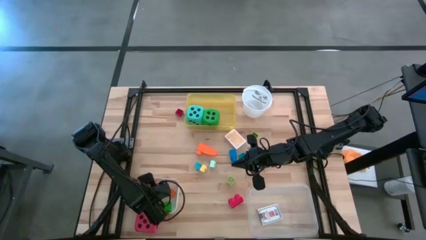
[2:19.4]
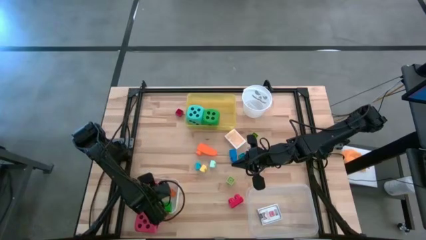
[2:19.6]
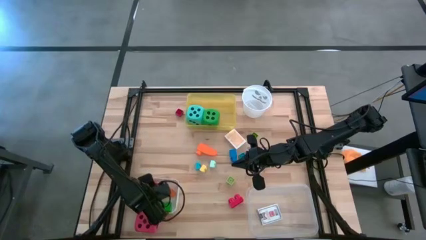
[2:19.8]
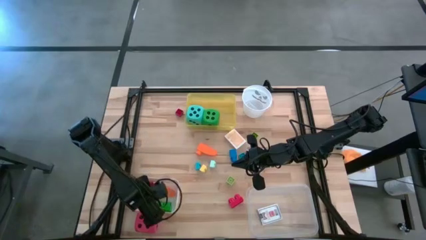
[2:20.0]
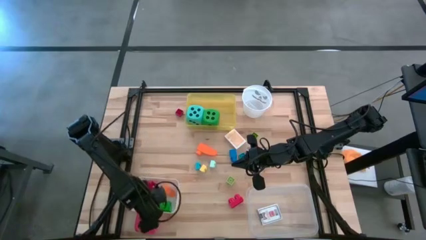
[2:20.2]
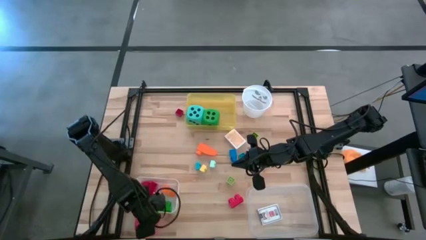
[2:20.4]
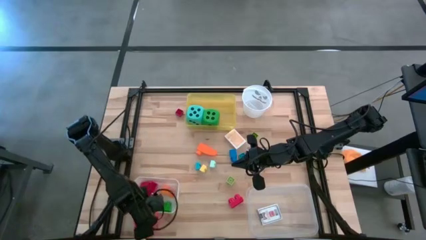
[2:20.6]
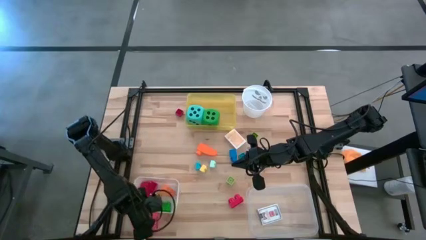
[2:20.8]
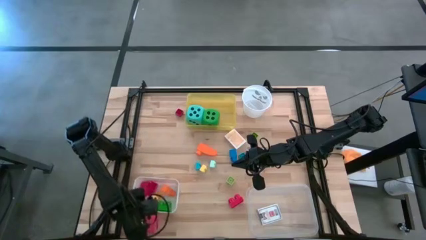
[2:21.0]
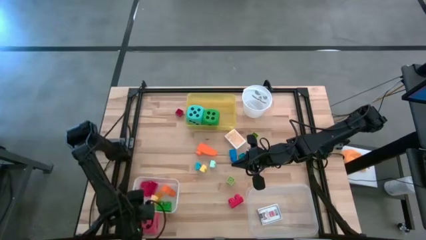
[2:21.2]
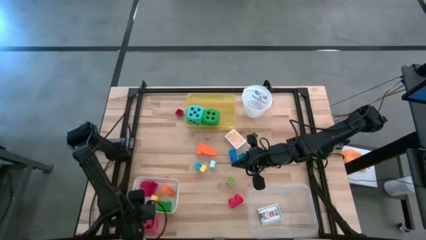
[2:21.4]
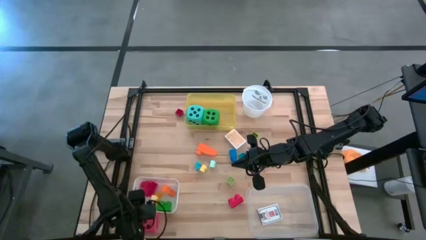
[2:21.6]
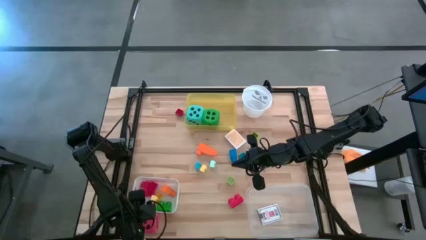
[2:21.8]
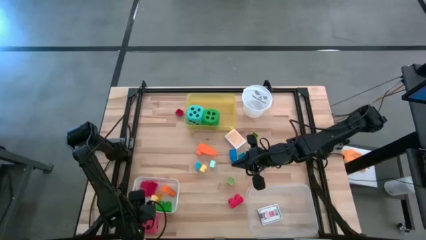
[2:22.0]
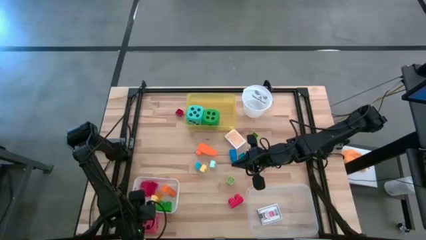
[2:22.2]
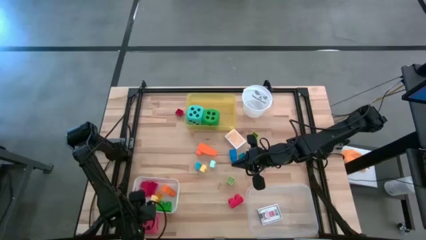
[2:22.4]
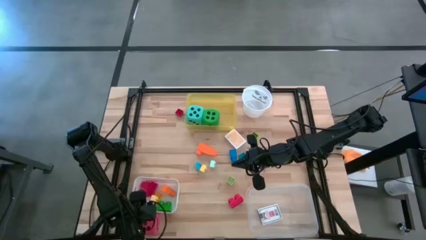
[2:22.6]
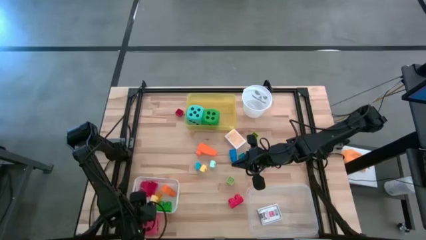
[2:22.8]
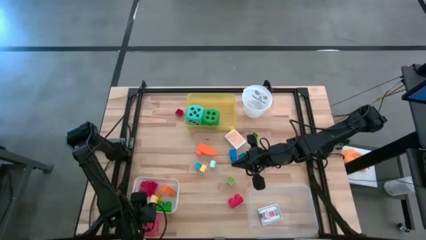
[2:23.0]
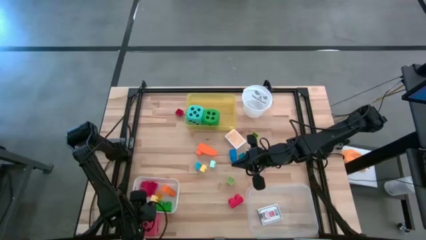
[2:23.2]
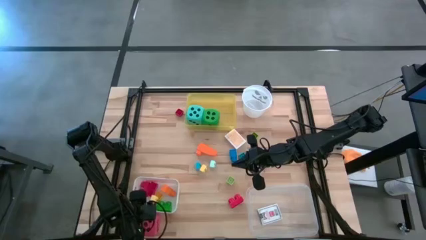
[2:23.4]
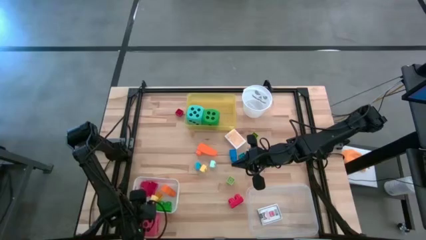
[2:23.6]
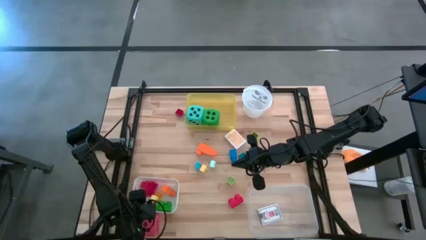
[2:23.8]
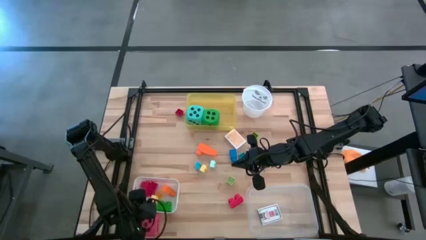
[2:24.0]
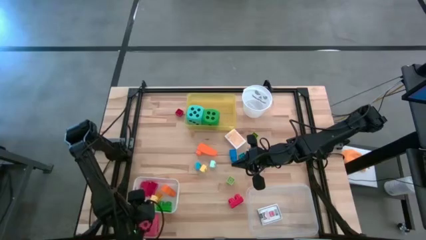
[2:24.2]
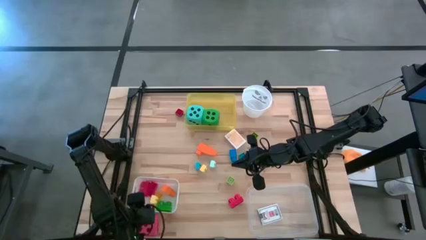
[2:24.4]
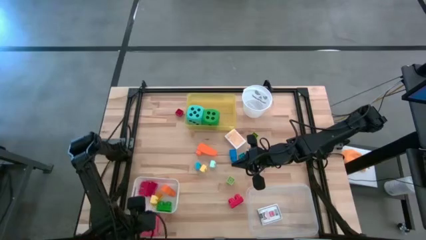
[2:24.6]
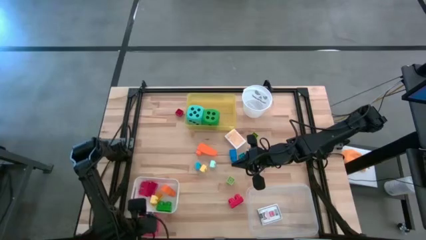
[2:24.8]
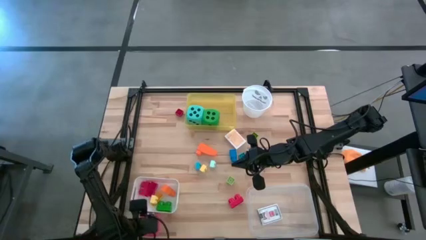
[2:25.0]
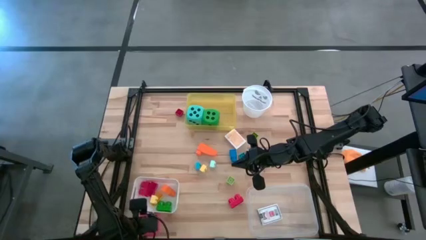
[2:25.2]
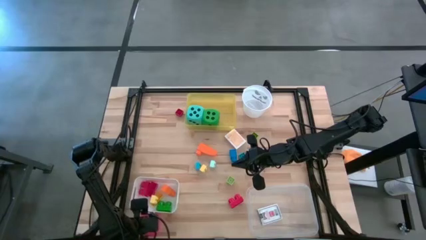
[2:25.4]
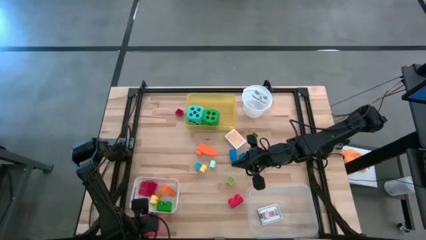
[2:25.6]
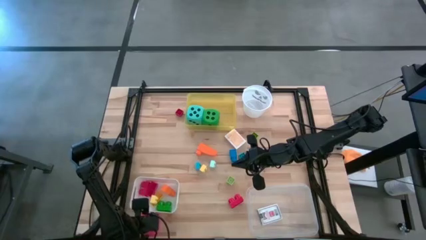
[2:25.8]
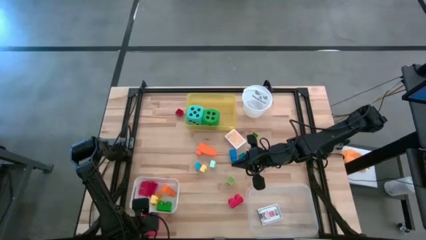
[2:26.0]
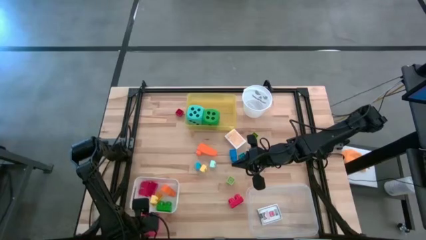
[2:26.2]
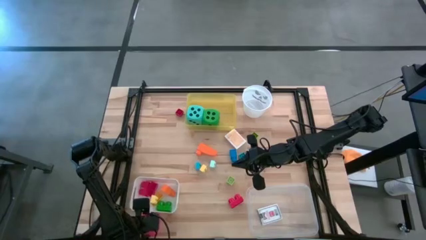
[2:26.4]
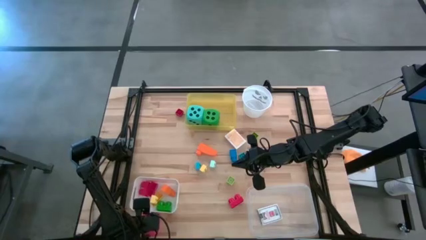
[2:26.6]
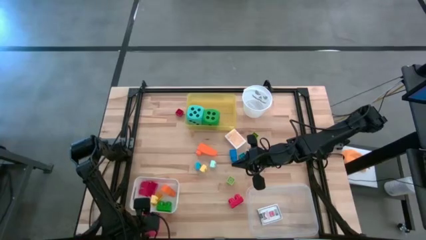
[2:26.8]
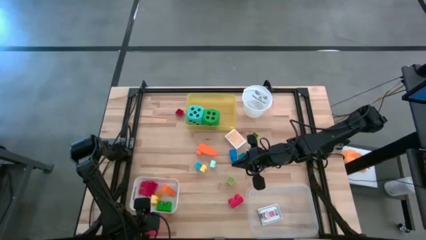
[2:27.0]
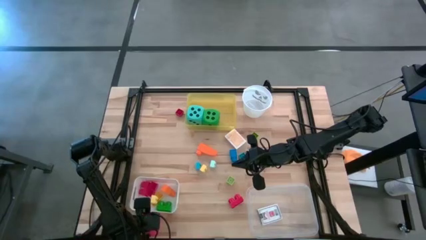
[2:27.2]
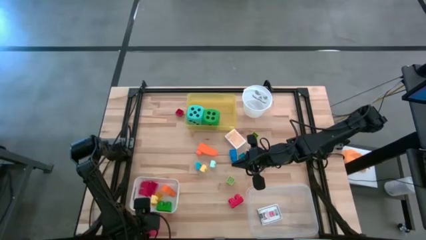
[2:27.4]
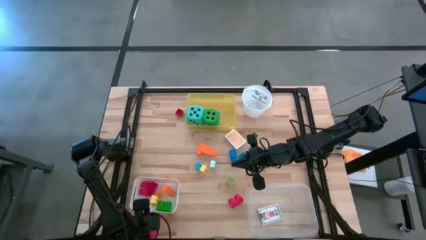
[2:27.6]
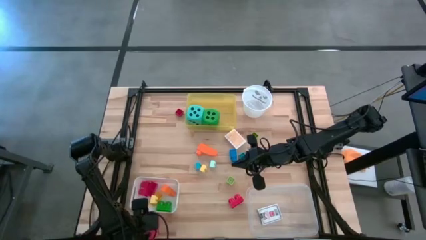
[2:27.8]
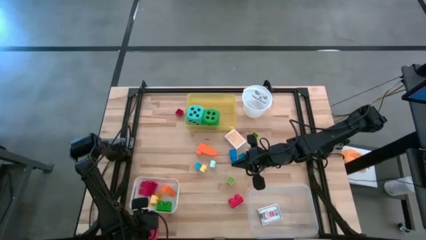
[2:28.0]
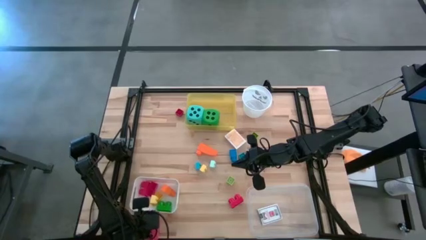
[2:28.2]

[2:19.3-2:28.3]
Task: Pick & Place Toys
Put the pink die into the yellow bin

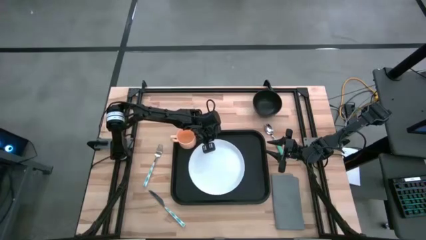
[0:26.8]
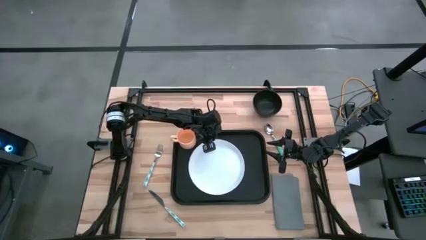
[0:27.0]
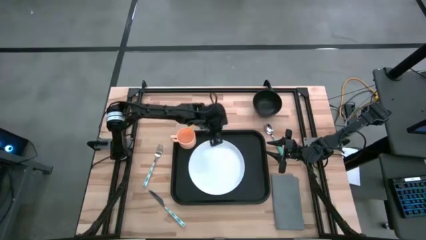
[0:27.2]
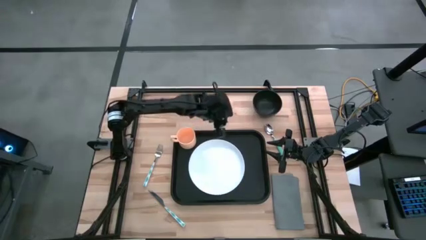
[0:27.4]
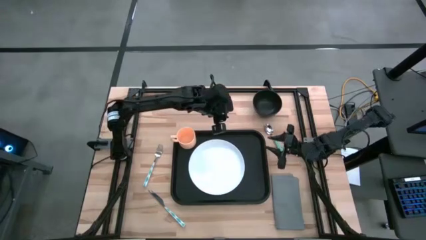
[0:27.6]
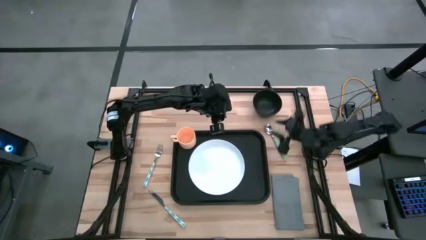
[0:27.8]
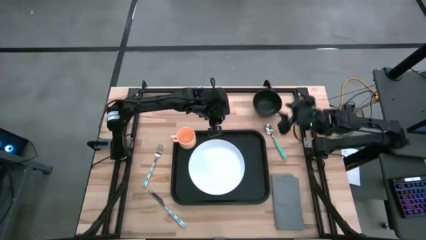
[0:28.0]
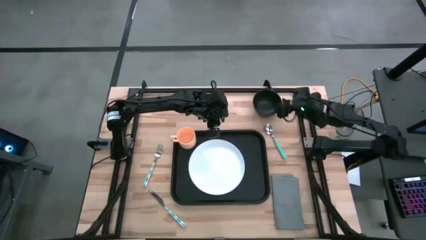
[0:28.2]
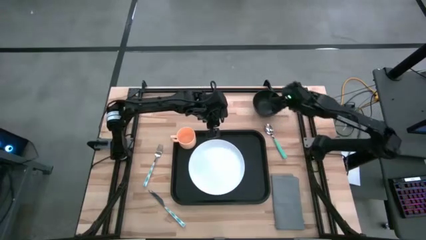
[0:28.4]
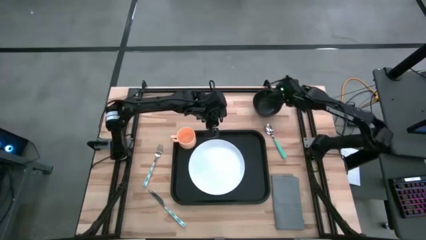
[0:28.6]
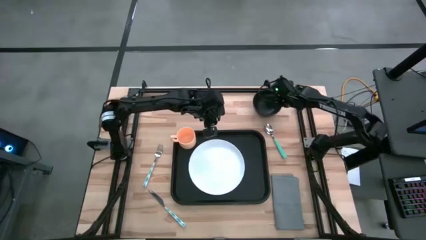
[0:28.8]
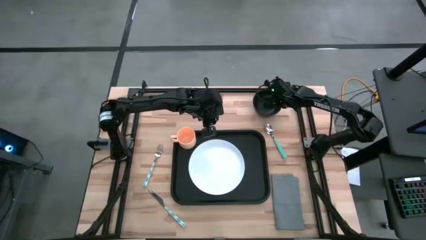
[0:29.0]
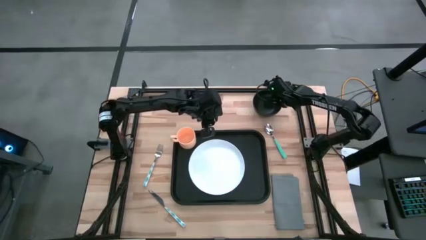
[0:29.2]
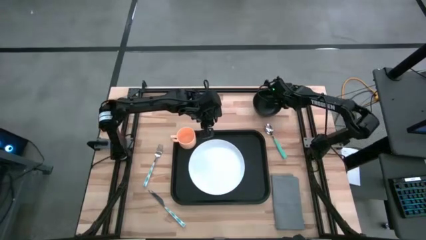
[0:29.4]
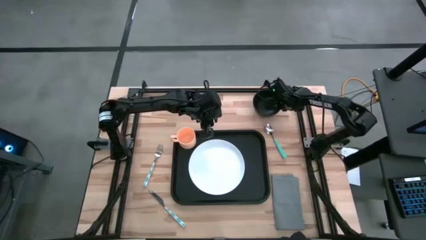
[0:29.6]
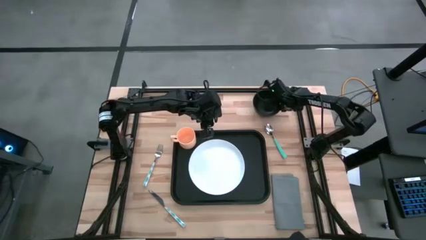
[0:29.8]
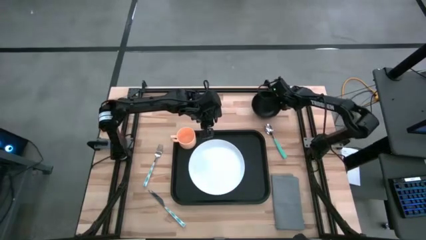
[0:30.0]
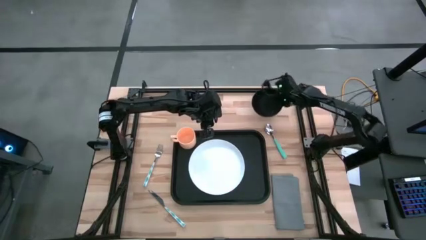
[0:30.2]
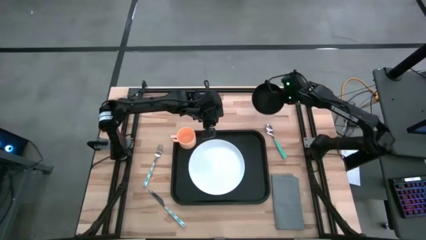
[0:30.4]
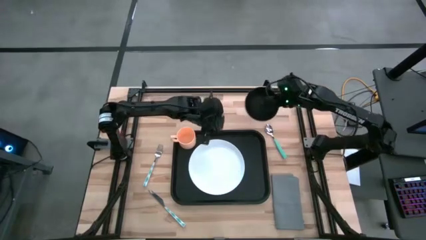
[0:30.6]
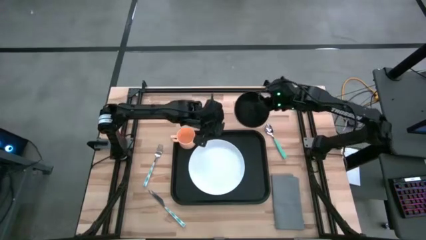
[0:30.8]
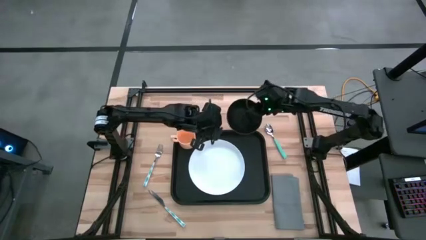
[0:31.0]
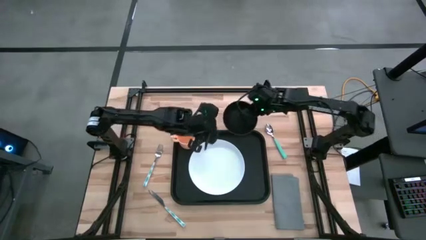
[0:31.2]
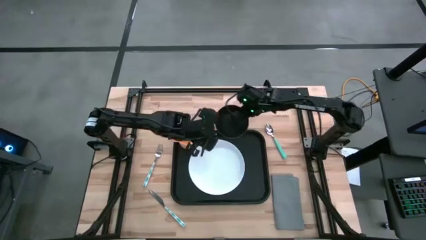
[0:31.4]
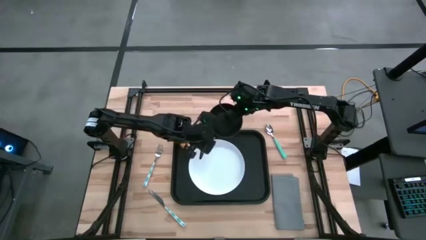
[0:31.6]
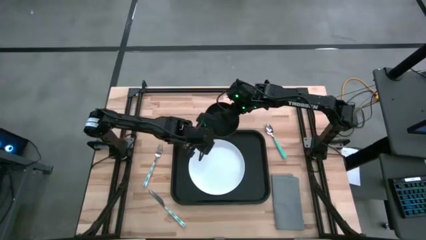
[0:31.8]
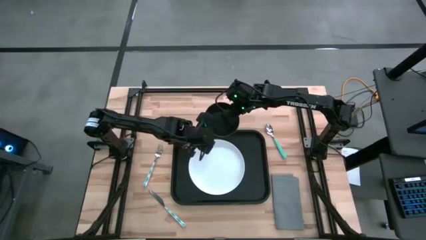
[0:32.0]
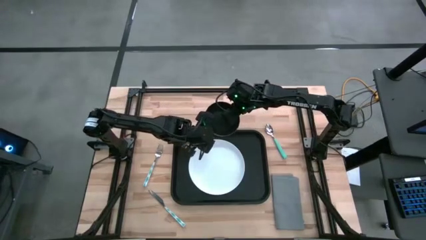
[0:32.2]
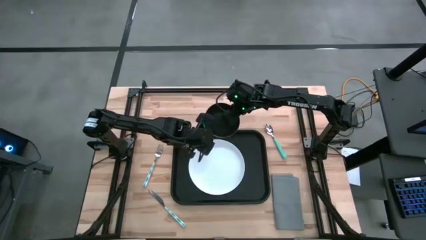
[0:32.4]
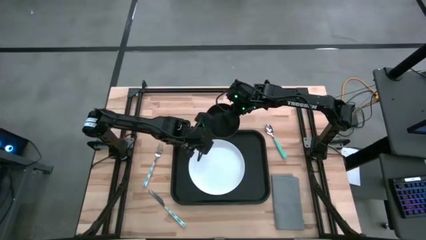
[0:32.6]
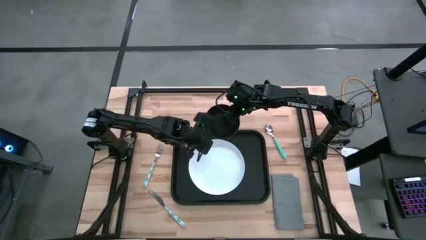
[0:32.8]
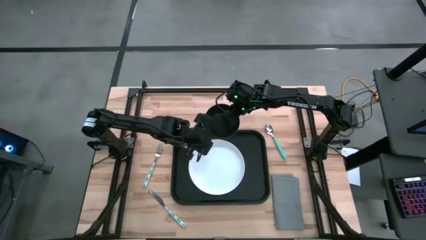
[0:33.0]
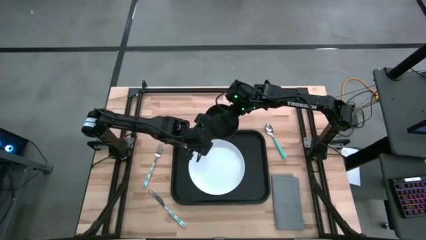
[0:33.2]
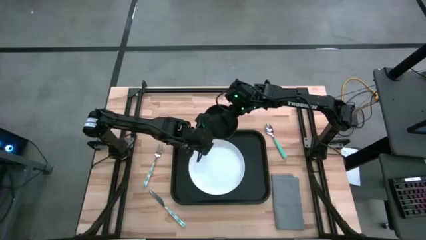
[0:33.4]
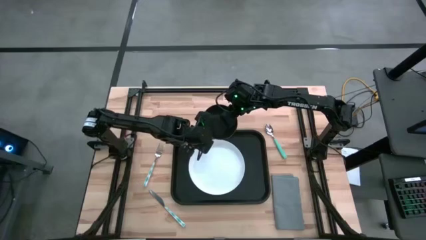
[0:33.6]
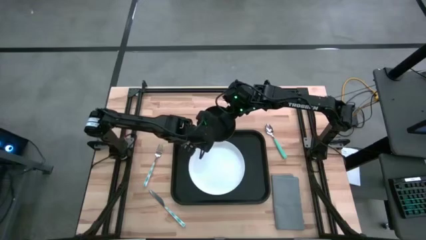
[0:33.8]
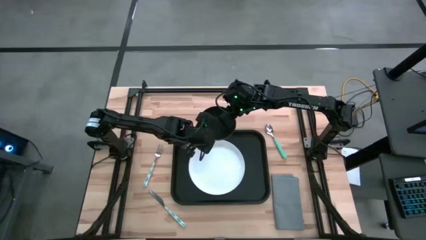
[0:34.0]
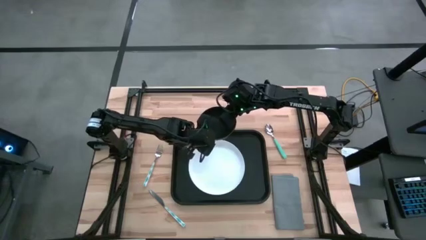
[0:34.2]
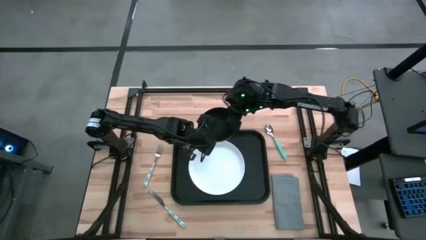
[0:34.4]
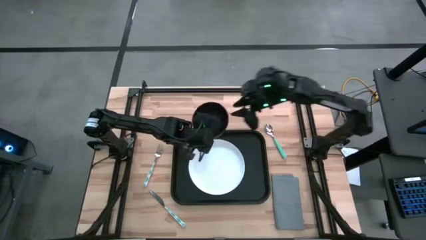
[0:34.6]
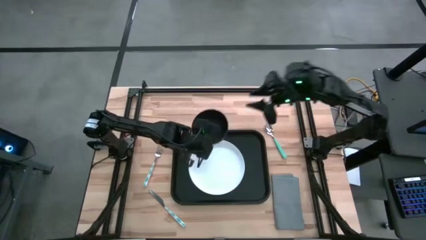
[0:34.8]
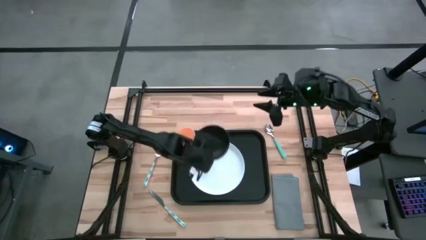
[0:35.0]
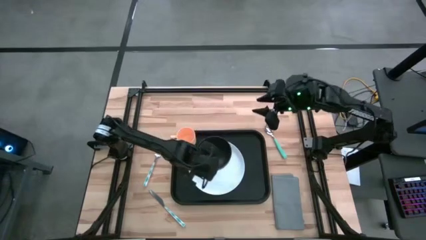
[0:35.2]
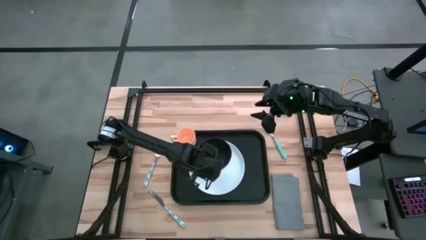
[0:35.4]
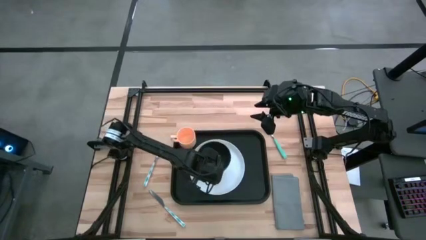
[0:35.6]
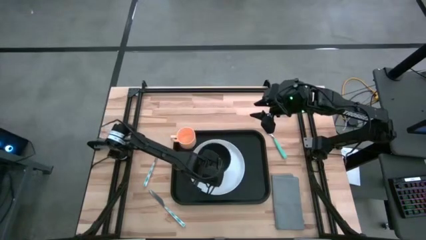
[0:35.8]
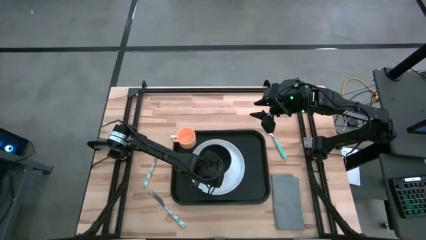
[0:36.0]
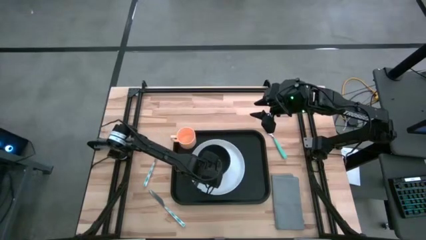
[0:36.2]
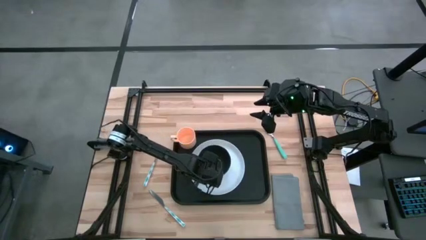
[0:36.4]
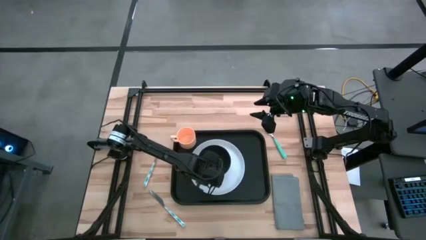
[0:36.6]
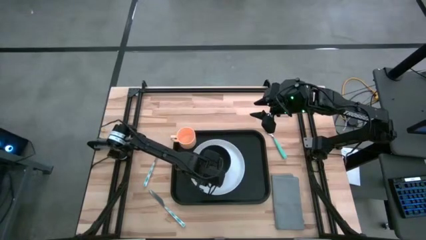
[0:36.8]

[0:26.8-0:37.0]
Task: Set up tray
Put the gray napkin on the black serving tray to the right of the white plate
